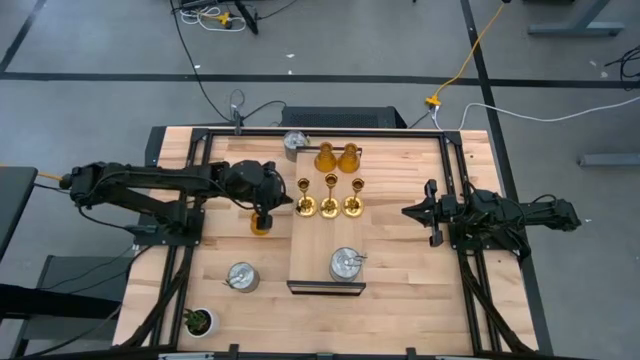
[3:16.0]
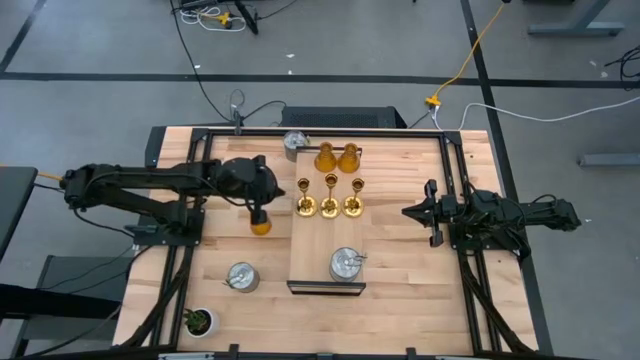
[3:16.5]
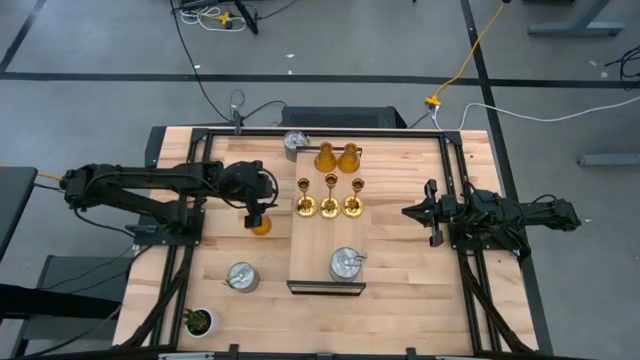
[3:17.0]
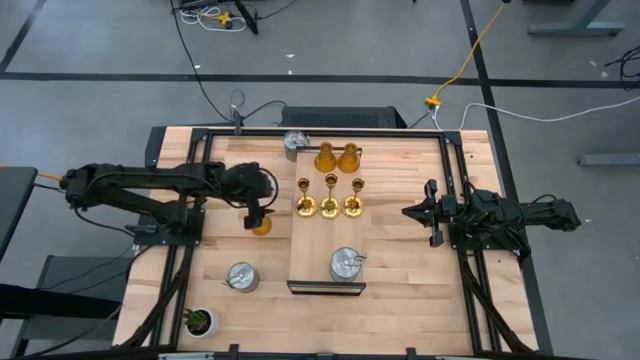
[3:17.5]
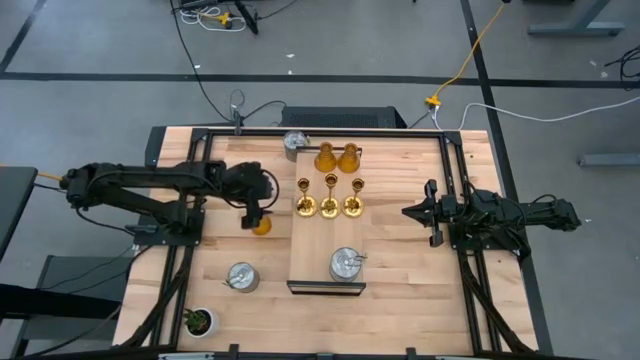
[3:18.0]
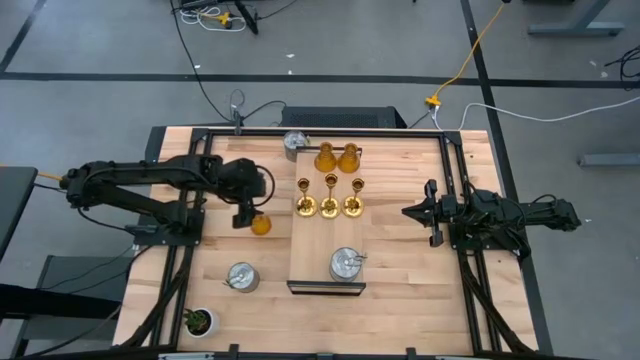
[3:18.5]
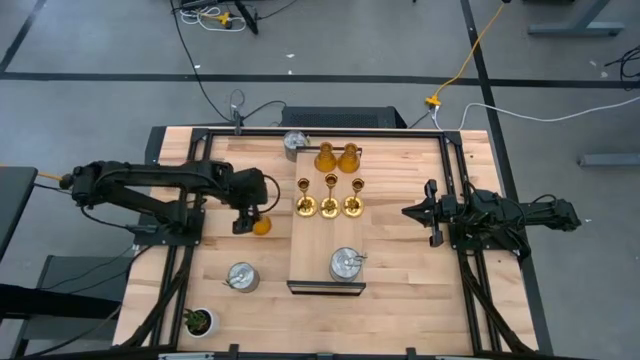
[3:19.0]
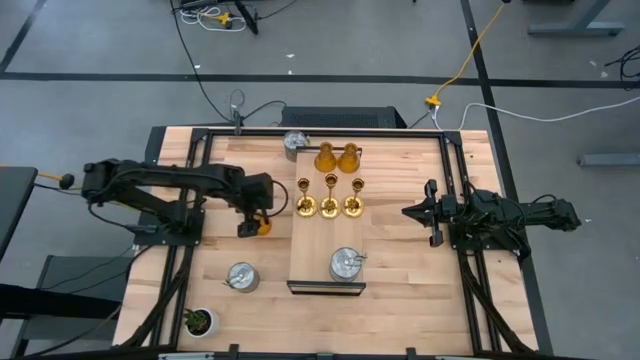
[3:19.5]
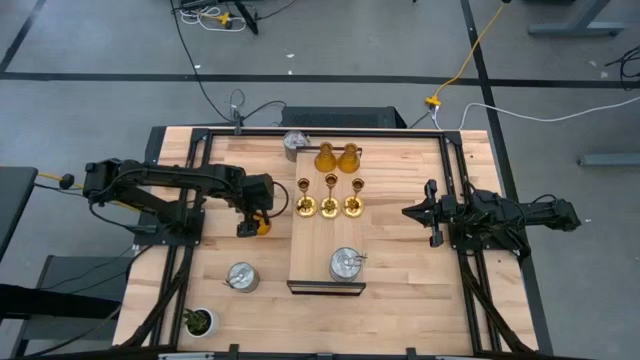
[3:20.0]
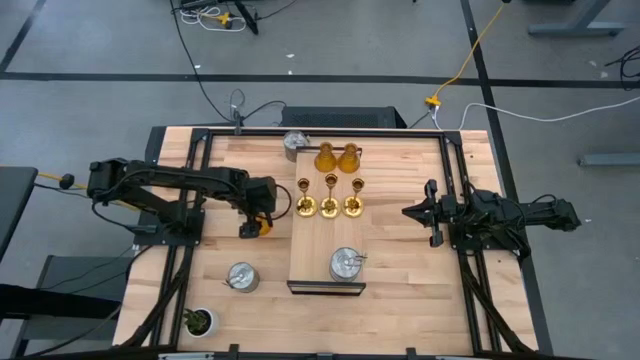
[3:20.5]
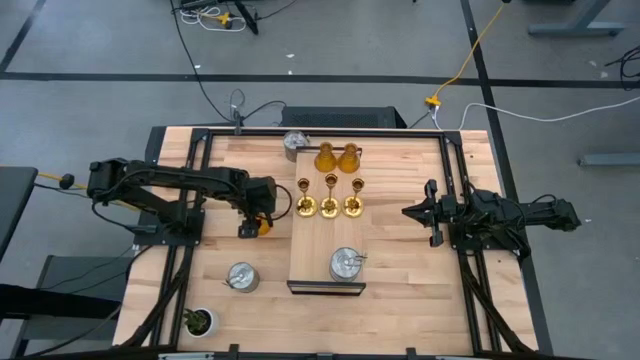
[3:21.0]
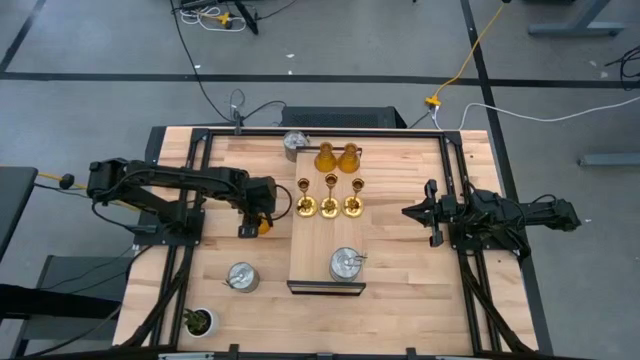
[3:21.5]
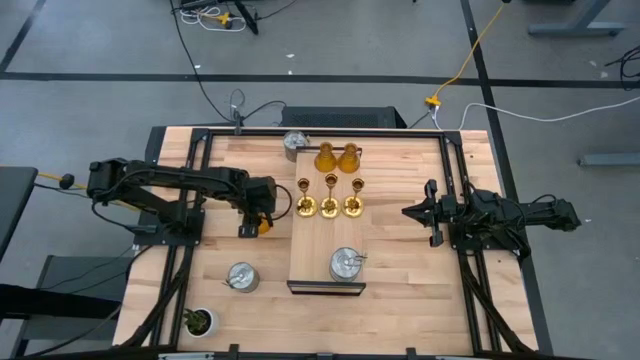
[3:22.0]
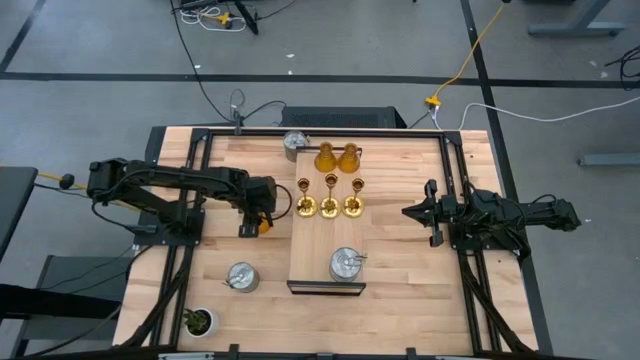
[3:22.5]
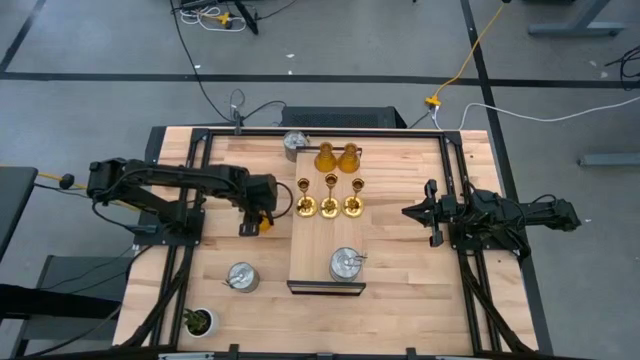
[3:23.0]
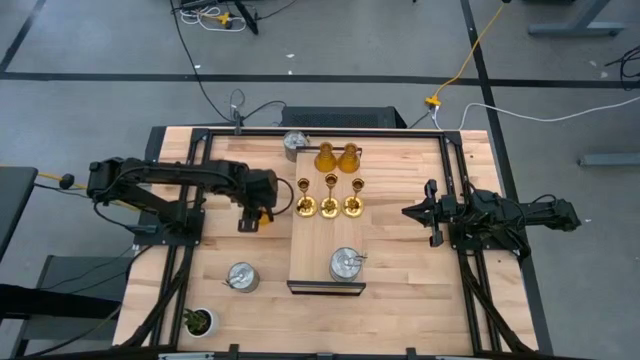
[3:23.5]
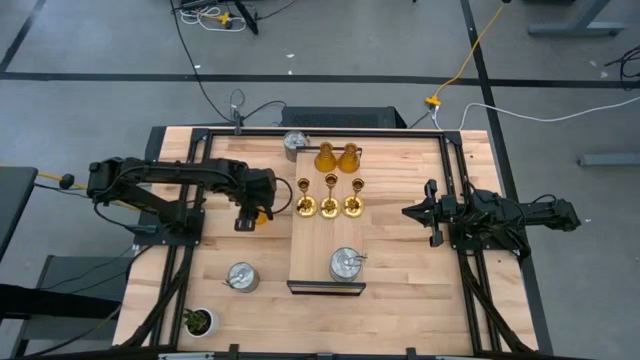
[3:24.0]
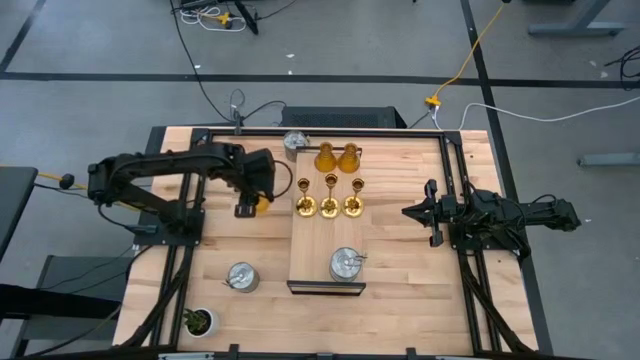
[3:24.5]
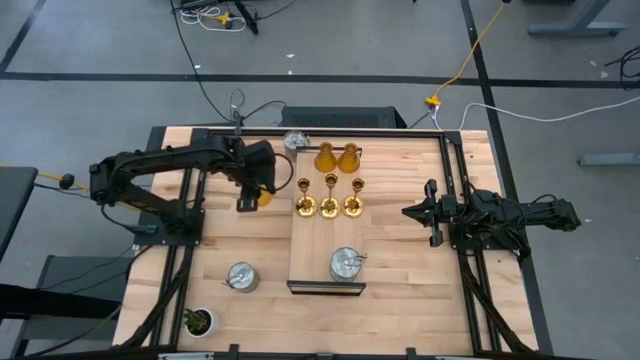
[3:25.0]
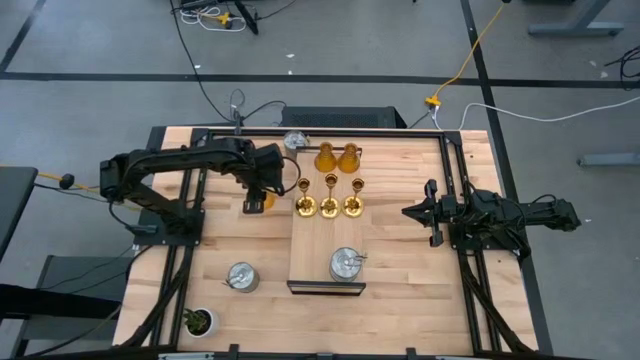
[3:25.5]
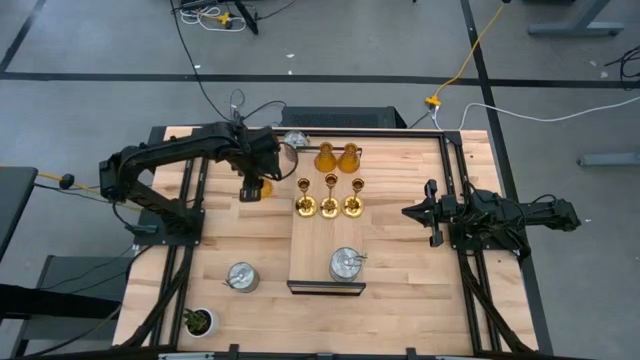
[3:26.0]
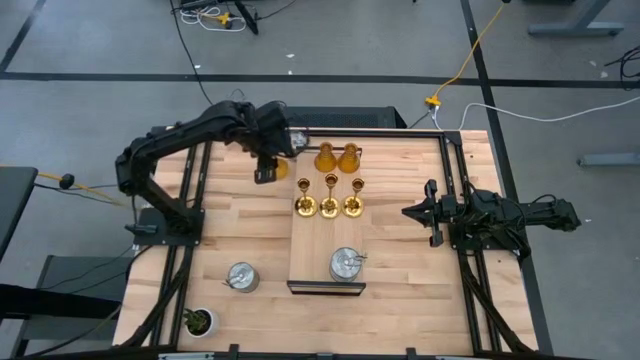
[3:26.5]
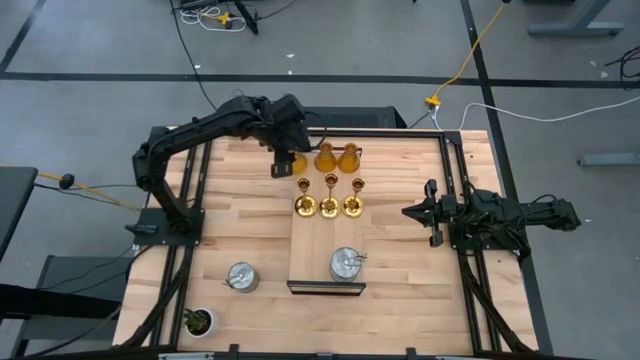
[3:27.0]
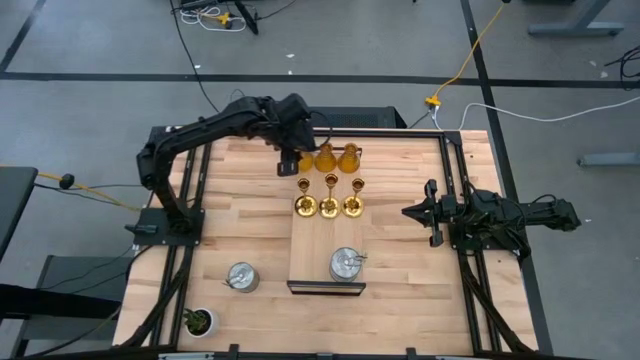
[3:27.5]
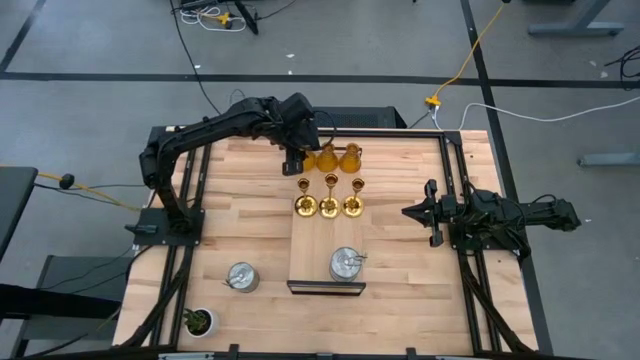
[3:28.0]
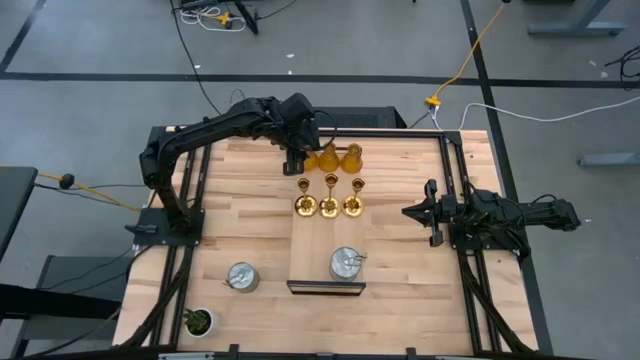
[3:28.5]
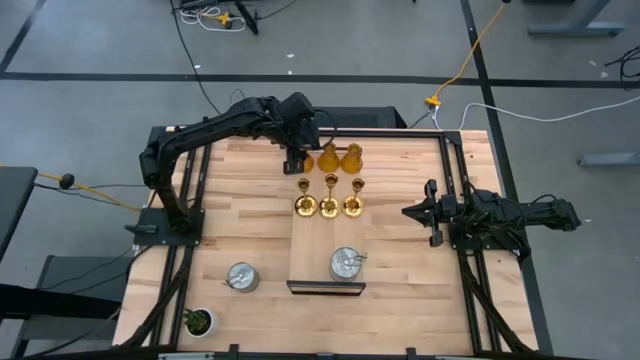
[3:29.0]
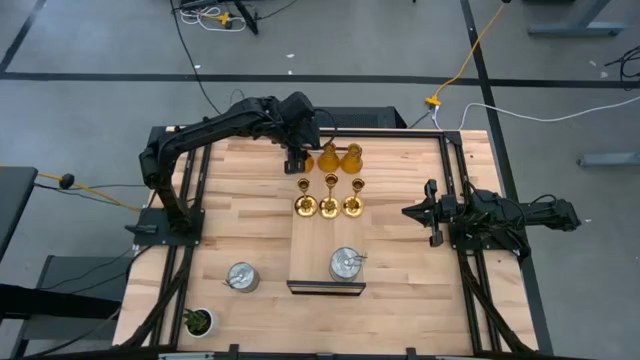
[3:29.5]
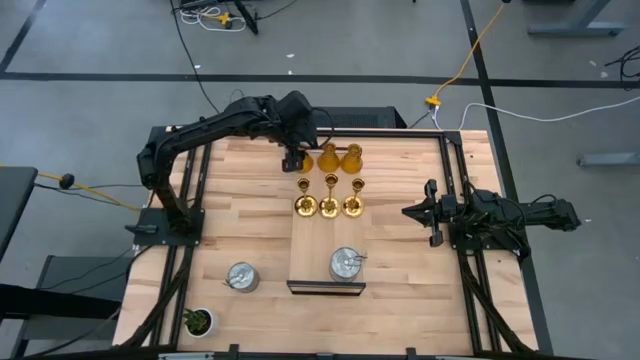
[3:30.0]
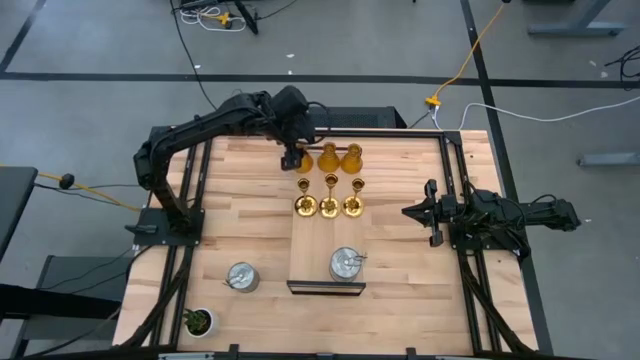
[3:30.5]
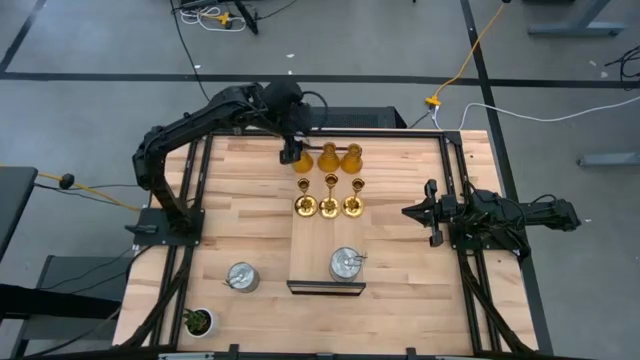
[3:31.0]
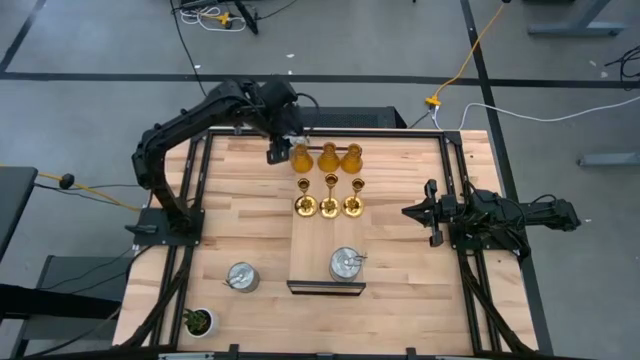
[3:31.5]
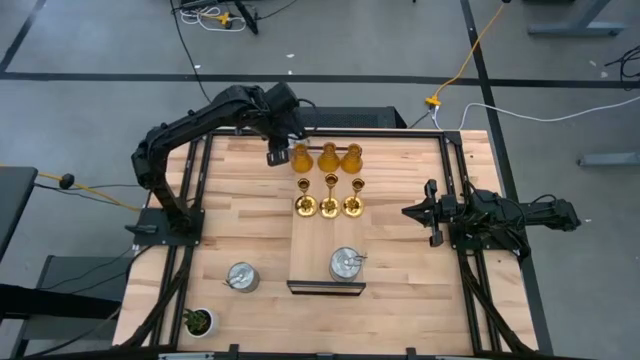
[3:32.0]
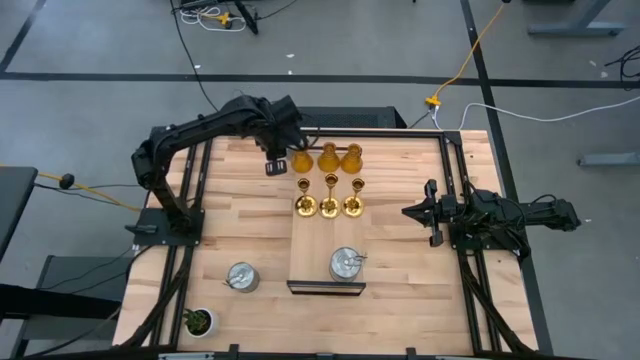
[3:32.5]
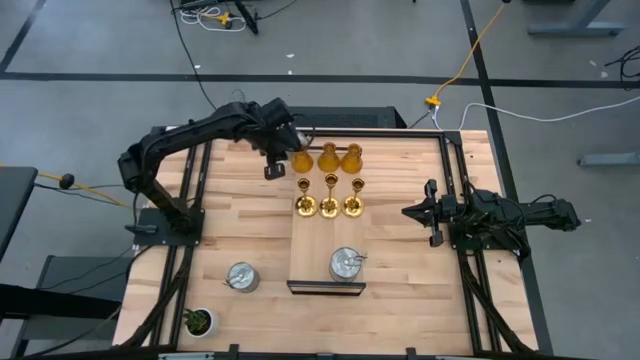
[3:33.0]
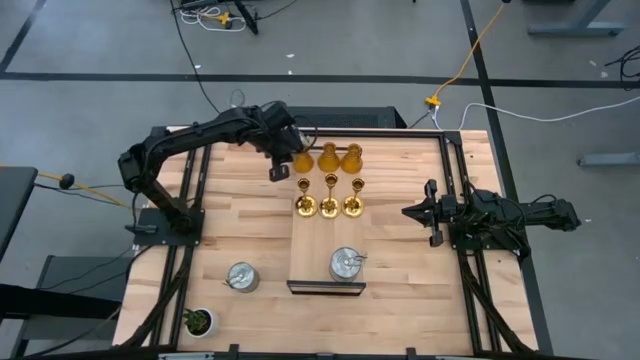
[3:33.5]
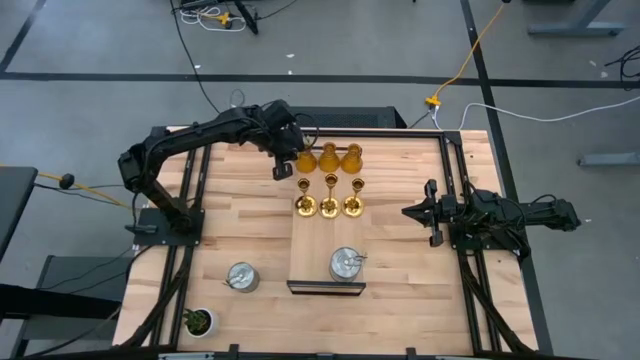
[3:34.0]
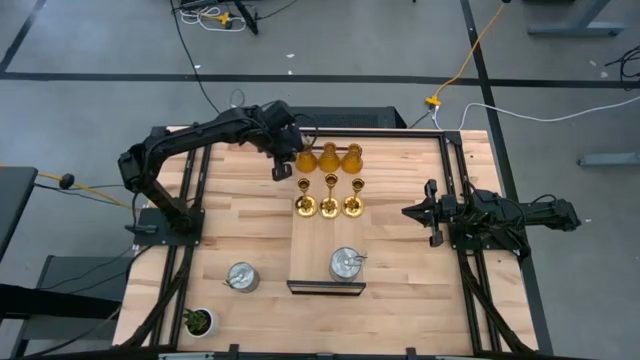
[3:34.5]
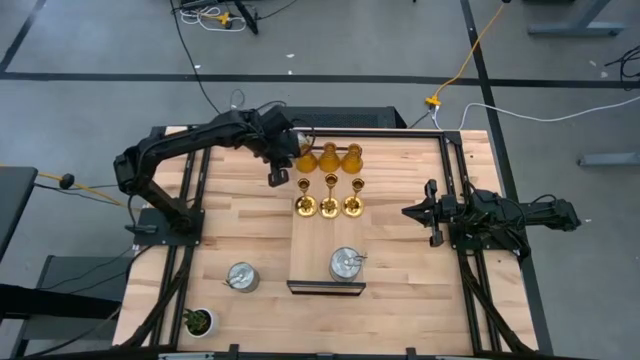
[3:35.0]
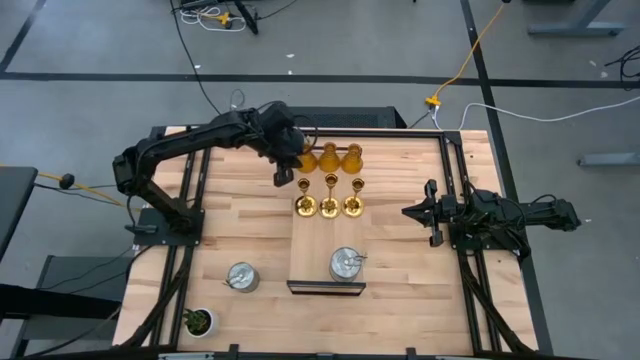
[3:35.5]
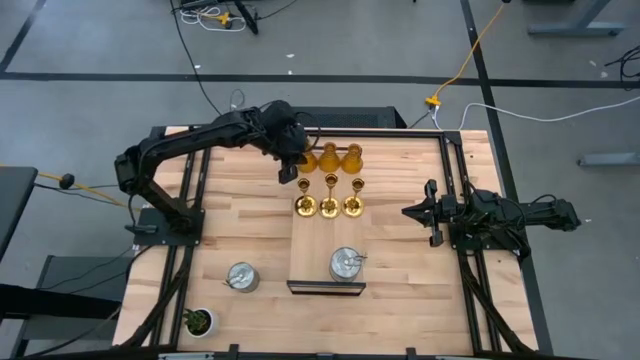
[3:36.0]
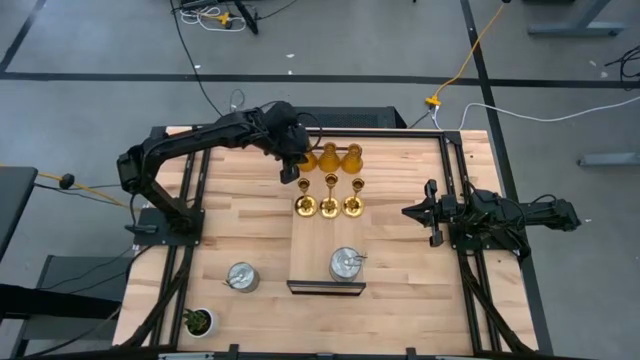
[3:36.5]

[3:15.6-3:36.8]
Task: Pick & Place candle stick holders
Put the glass candle holder on the shelf aligned with the other glass candle holder
